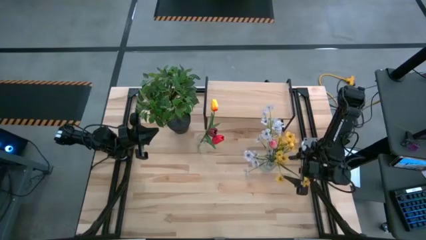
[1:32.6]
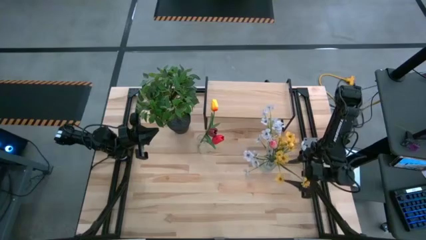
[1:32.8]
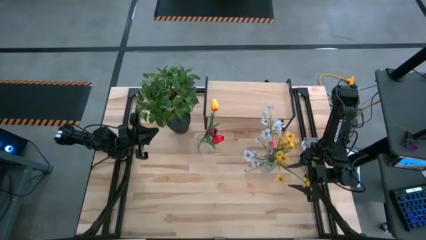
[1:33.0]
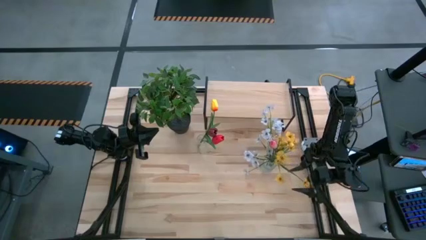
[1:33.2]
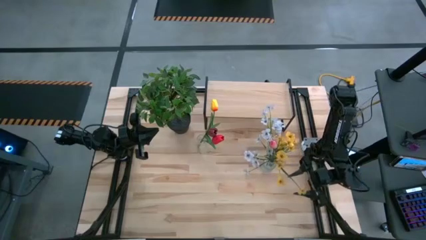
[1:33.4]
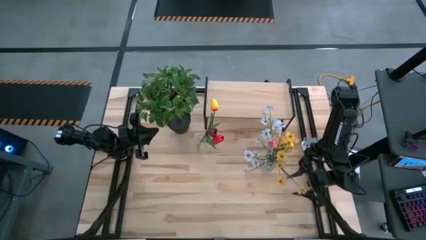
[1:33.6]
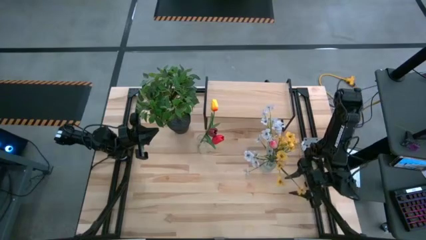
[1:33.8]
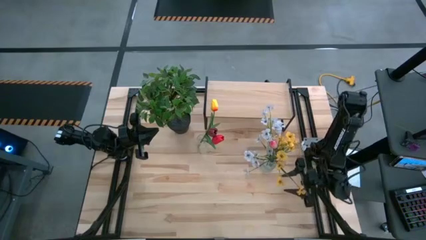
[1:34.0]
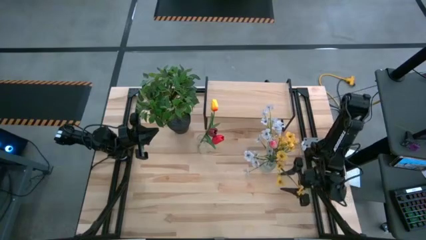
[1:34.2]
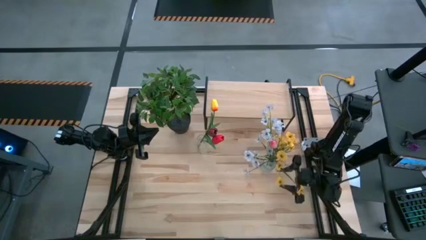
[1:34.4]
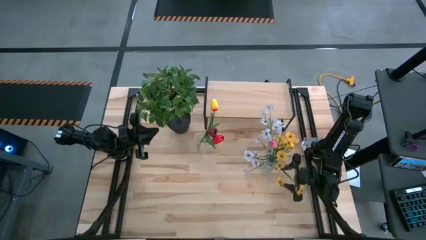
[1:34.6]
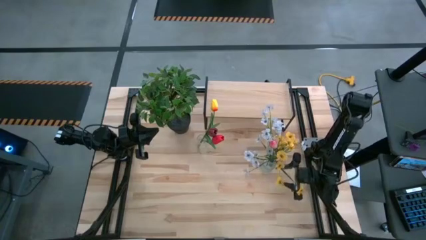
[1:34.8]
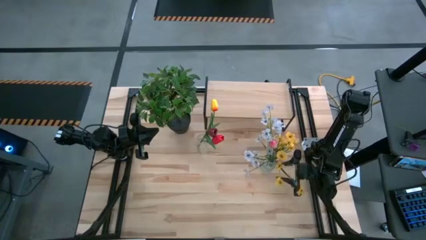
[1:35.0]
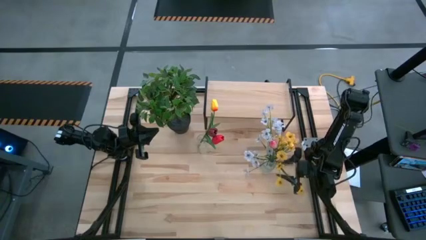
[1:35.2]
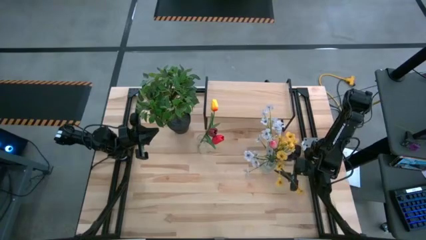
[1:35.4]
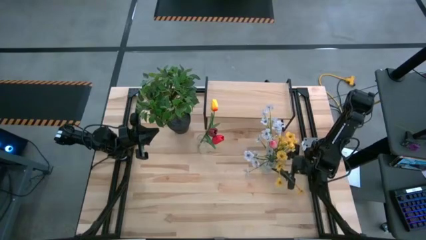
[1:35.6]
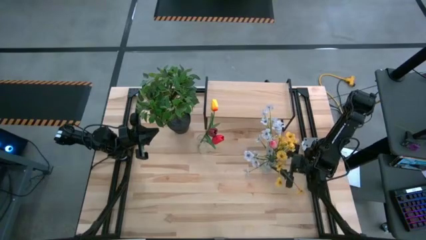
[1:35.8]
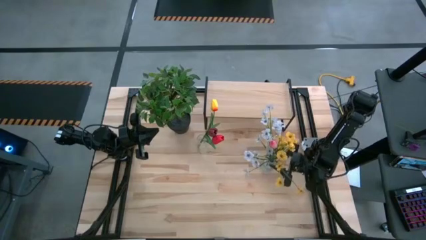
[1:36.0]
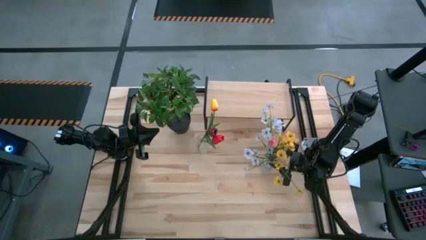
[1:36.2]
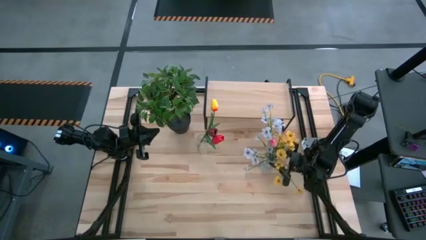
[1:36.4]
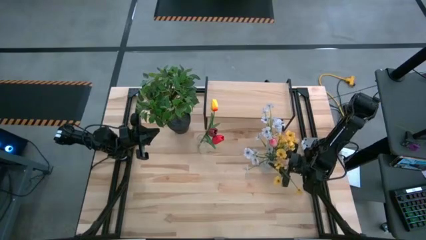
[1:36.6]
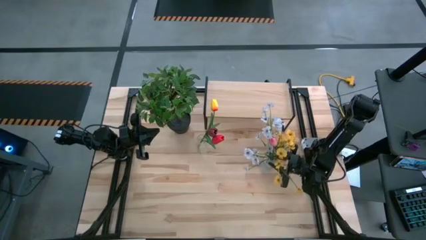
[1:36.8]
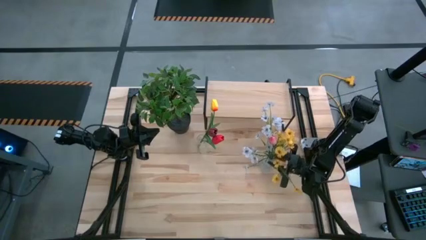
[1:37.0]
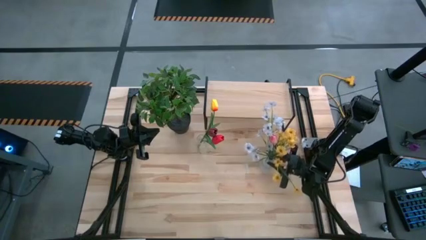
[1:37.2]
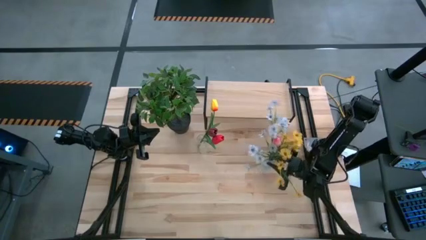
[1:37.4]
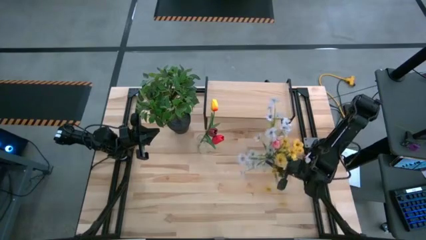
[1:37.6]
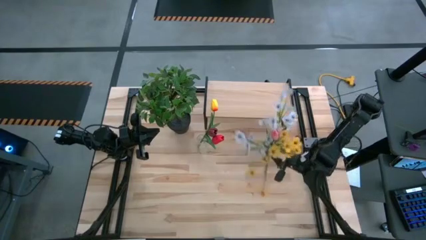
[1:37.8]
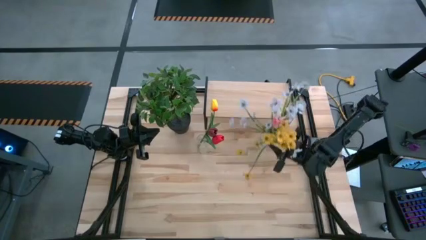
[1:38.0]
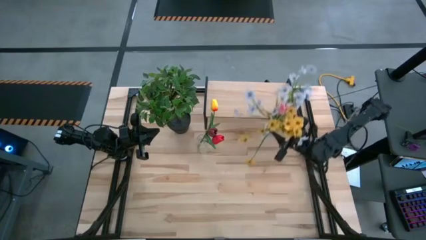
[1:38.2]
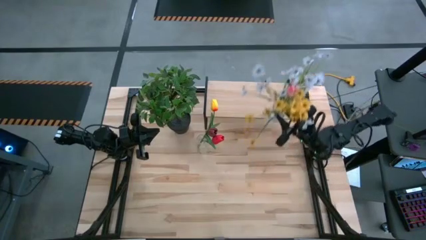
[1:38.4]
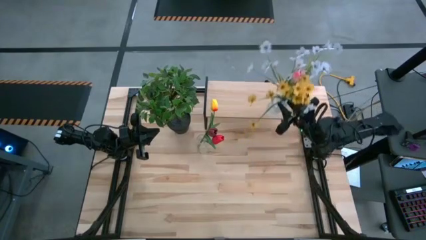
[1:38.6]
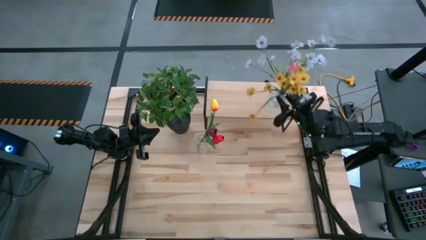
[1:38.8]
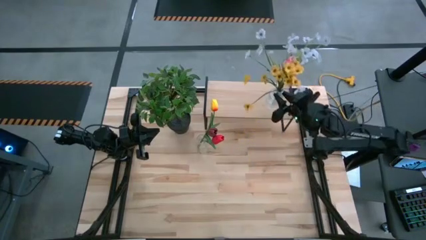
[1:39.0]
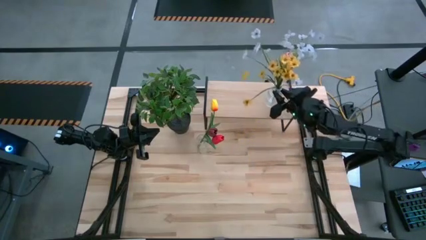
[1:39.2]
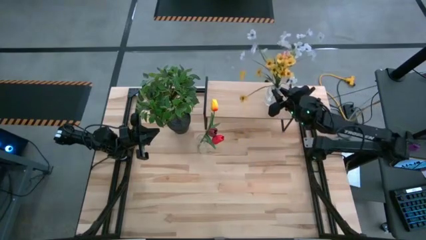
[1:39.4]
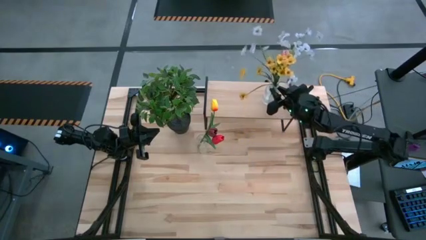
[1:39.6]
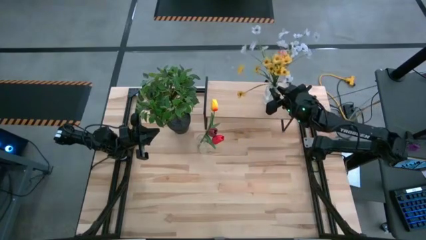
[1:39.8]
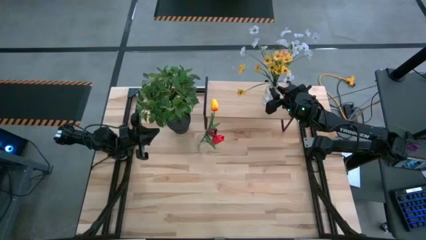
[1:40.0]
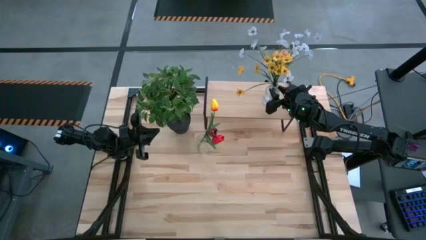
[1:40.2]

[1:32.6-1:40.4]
Task: Pick and place flowers into a vace then onto a shelf
Put the right transparent vase on the shelf

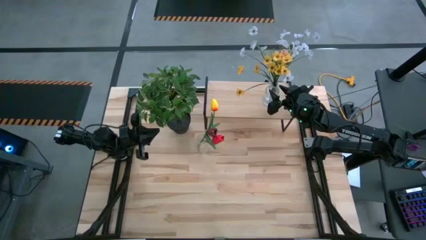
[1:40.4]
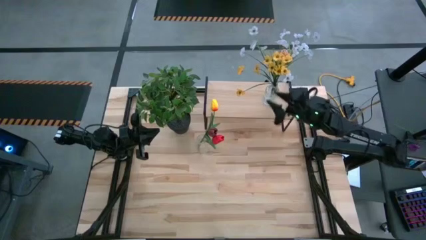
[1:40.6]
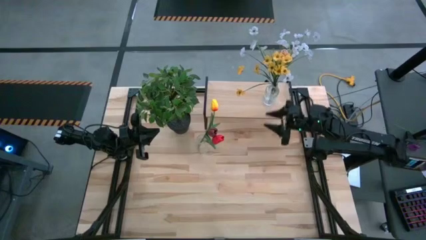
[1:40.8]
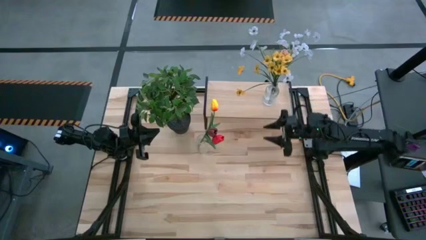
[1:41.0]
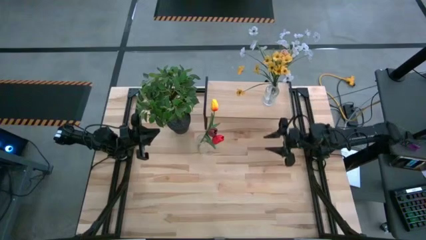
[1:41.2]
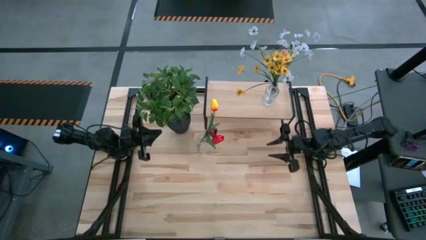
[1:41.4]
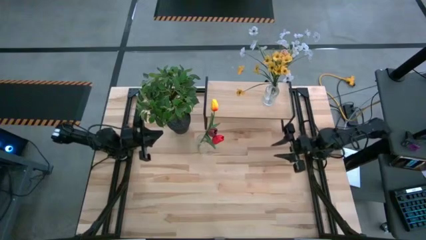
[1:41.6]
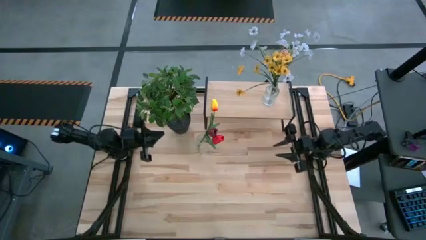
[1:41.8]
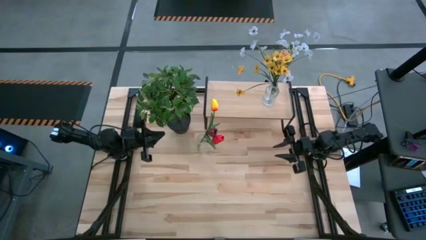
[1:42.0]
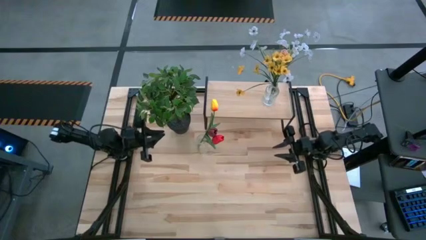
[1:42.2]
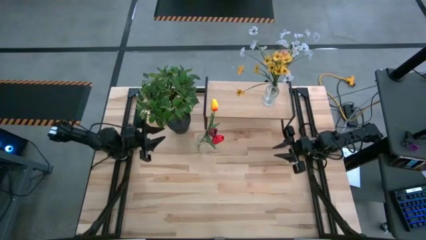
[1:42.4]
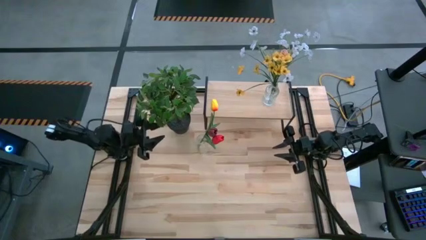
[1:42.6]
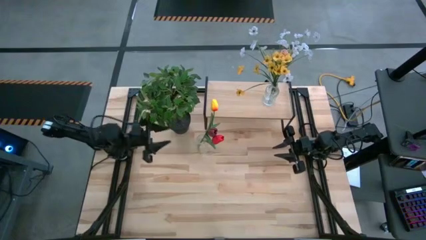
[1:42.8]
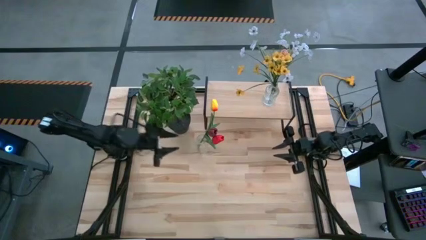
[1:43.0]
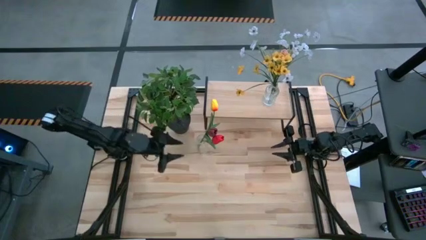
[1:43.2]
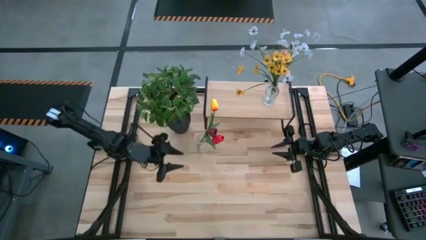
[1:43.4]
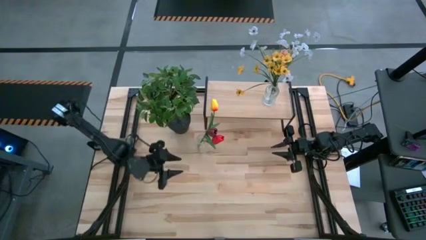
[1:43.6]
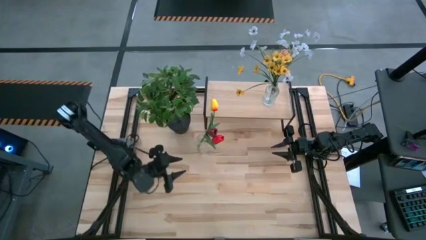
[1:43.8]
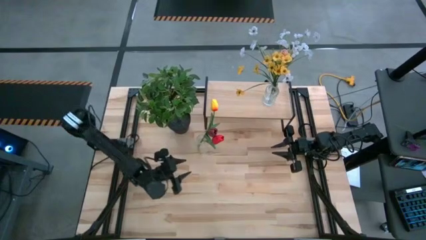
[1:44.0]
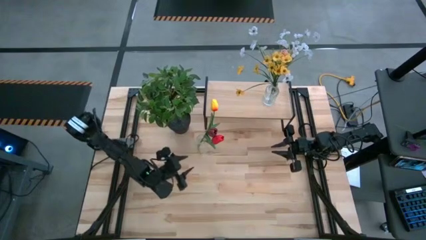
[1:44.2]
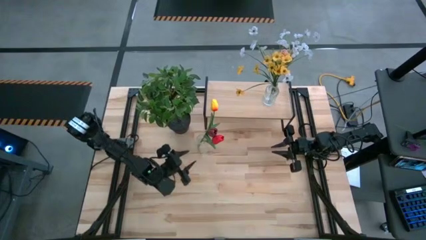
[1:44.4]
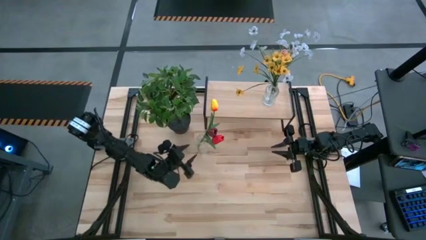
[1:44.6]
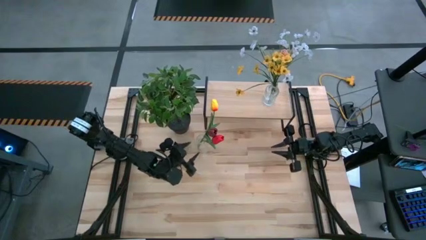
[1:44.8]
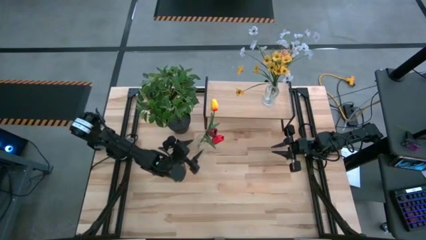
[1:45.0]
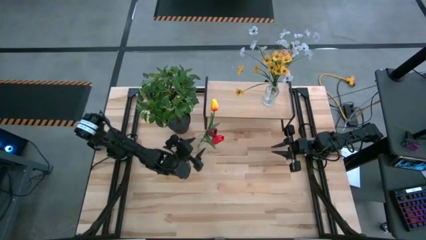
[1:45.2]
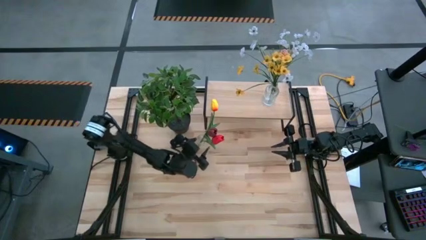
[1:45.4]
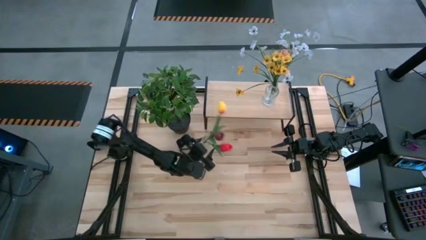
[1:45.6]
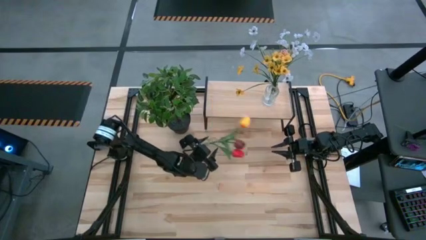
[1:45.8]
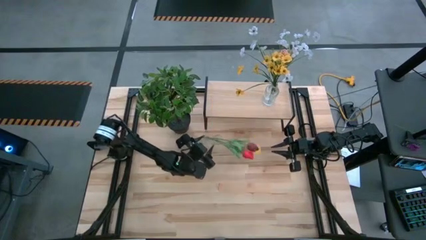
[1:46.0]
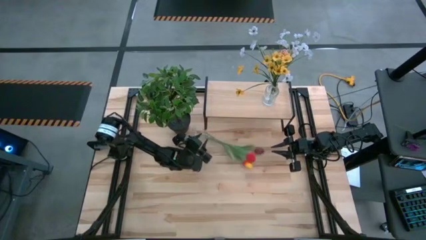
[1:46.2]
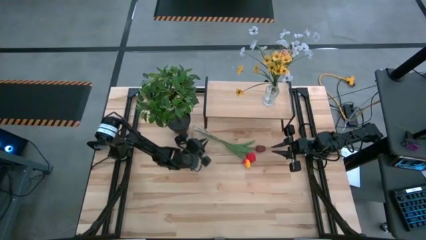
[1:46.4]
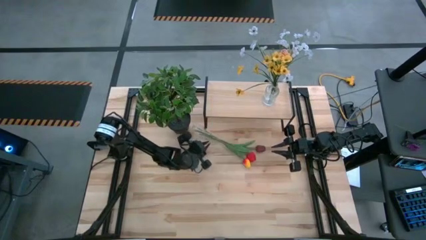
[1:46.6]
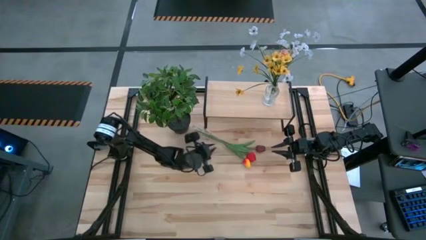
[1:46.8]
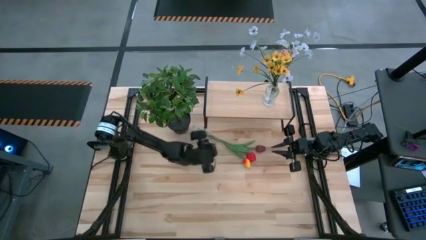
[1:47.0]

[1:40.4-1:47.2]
Put the transparent vase on the shelf
